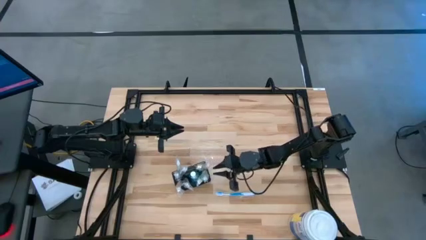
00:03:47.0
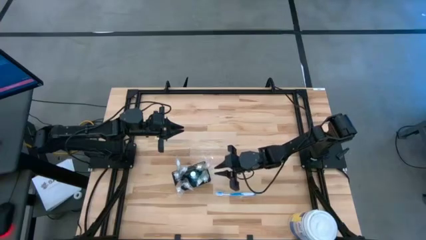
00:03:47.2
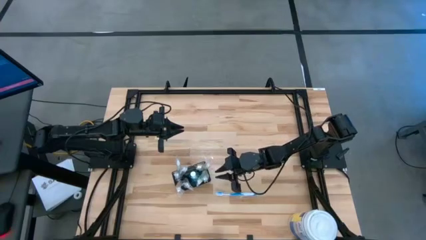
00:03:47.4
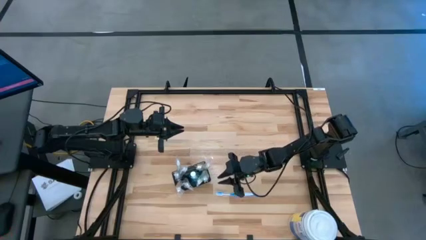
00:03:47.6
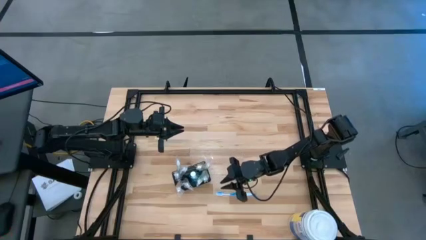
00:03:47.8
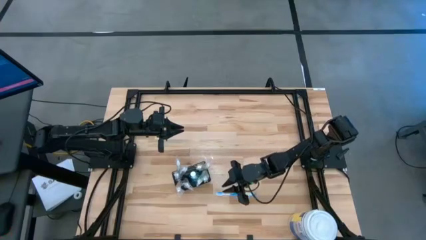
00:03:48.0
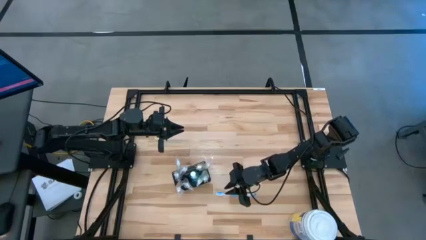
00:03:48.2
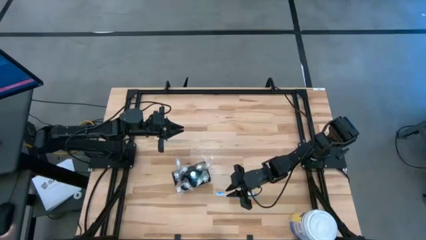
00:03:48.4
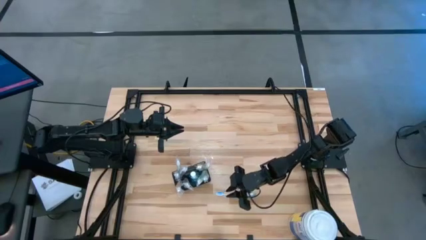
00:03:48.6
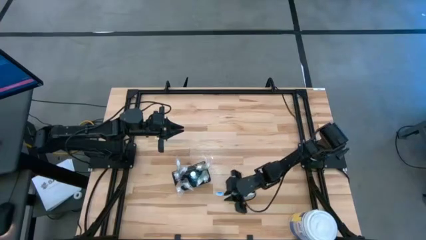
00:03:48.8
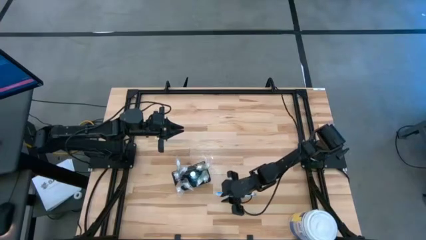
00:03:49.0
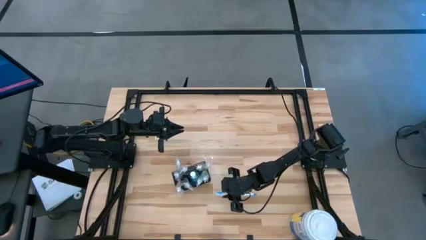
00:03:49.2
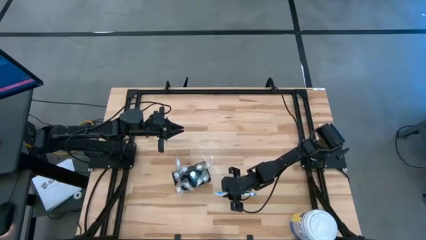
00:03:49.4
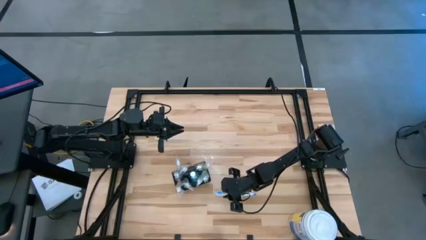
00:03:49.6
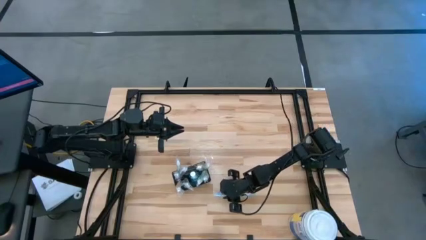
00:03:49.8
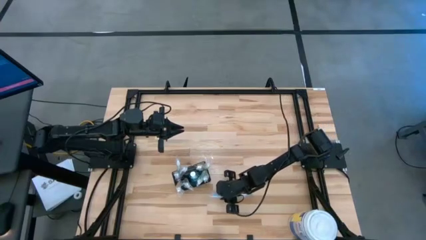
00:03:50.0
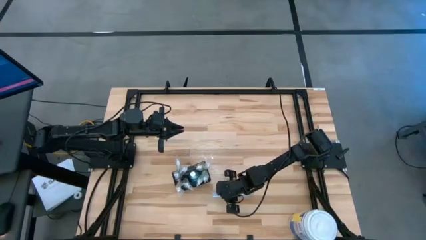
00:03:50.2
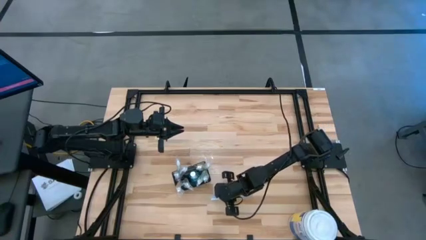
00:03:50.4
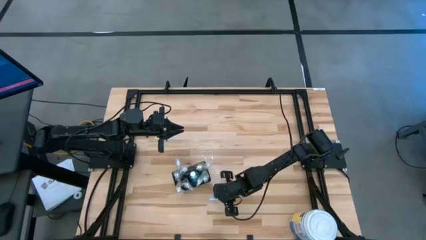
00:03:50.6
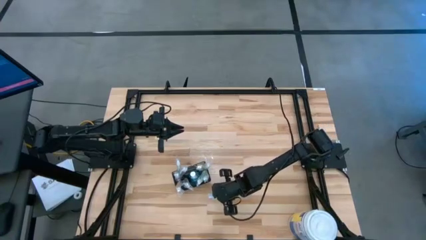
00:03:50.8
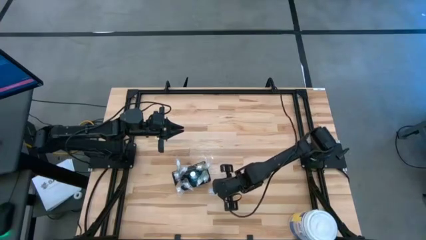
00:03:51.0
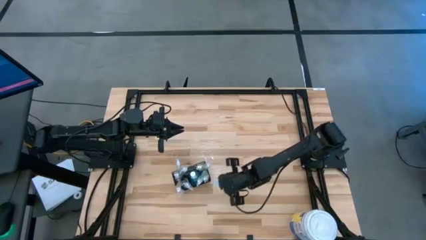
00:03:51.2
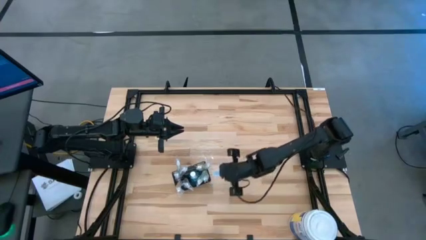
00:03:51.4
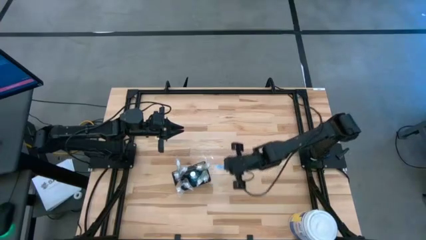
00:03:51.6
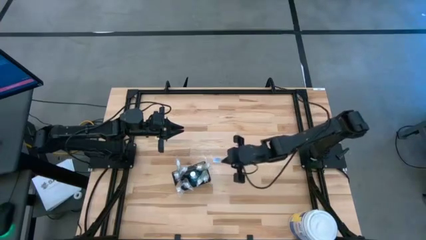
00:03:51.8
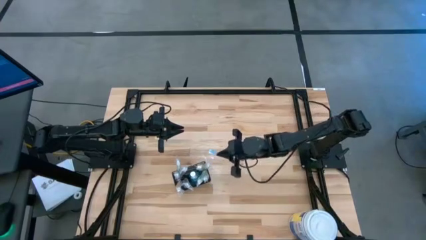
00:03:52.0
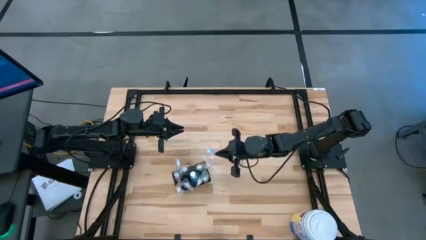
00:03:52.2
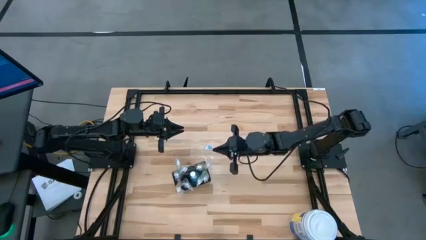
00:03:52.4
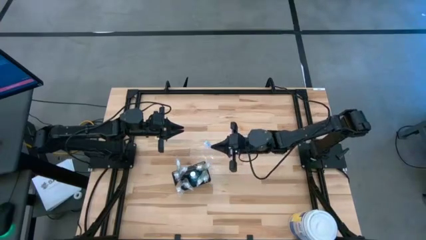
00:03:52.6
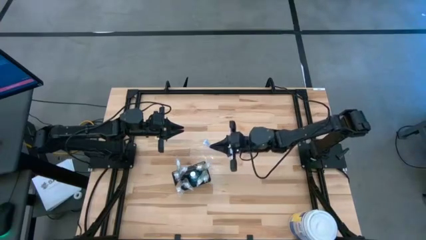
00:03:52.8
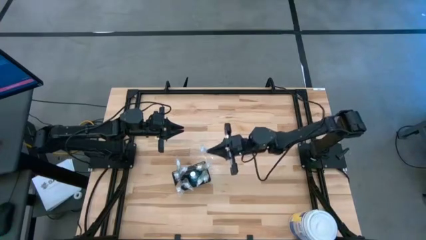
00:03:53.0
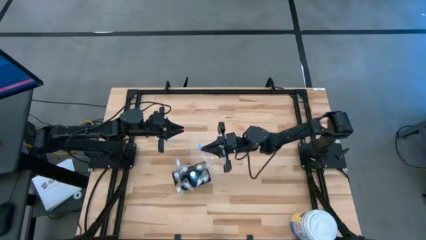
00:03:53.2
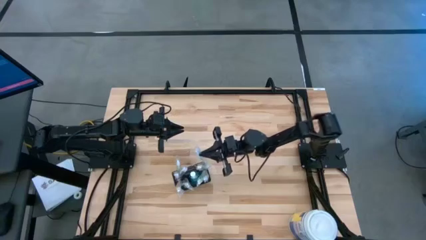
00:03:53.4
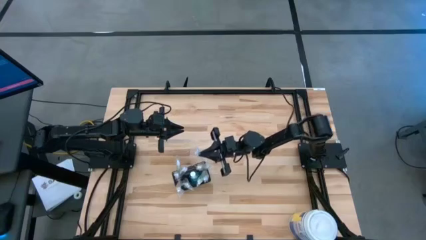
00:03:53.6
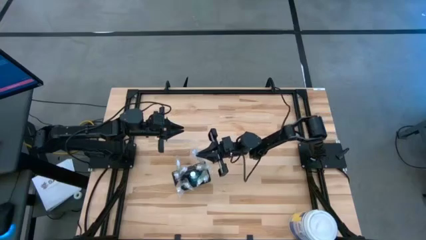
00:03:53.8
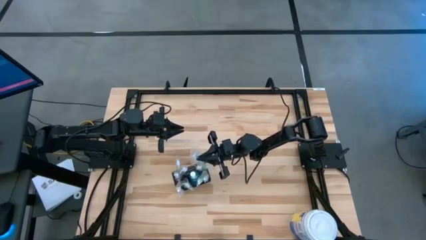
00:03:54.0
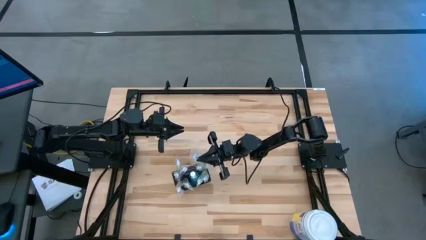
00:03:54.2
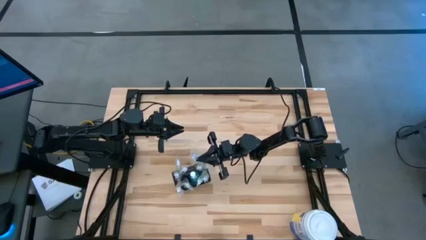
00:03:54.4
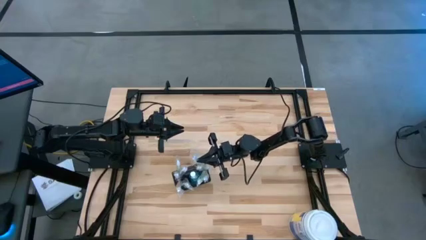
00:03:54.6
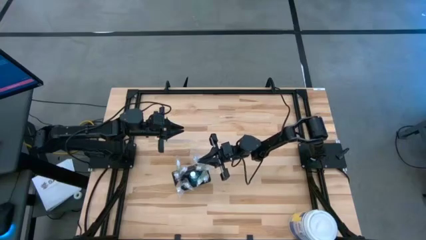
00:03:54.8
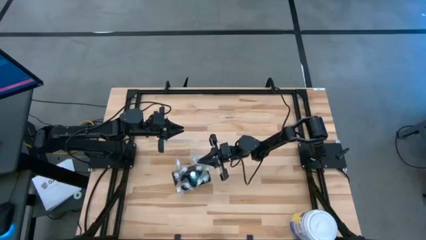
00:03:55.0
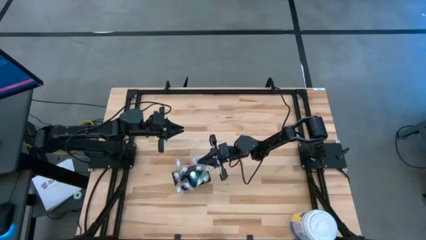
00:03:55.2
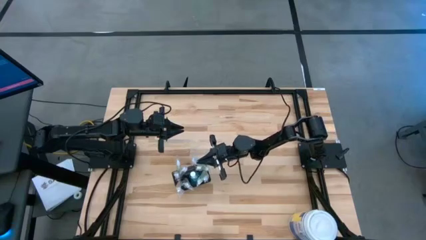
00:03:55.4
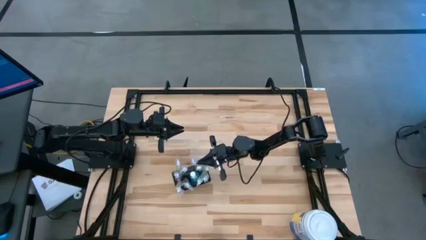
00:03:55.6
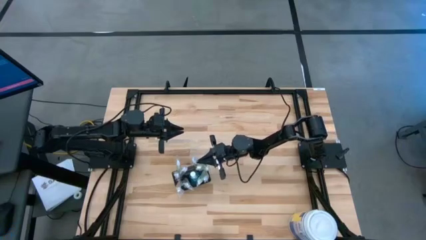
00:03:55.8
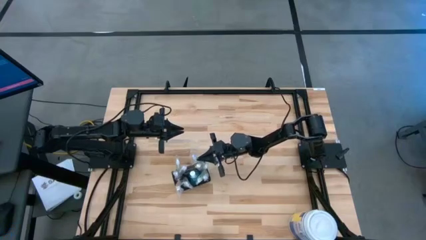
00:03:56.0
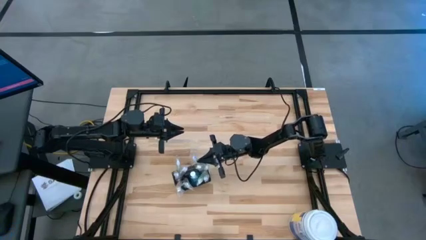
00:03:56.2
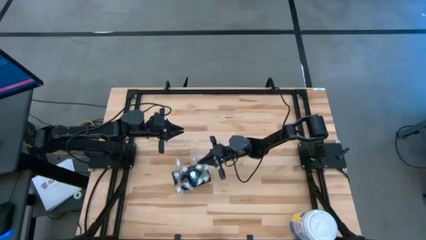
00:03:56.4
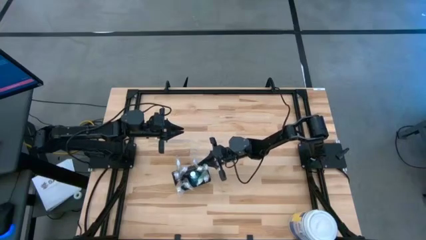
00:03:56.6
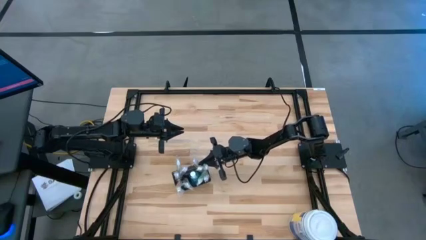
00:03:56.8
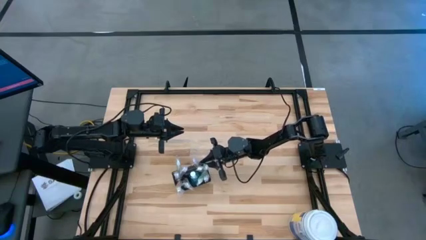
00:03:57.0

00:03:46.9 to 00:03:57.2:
Task: Pick & Place toothbrushing station
Put the white blue toothbrush into the black toothbrush rack

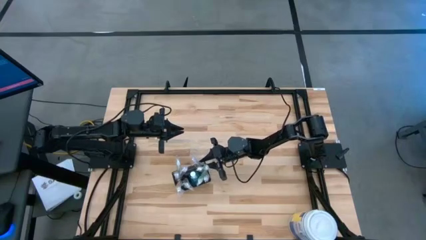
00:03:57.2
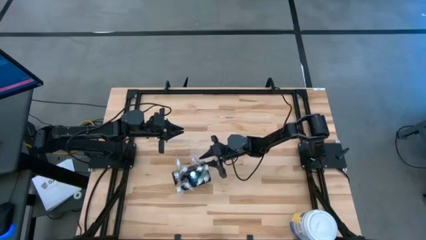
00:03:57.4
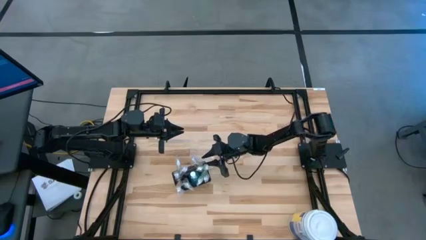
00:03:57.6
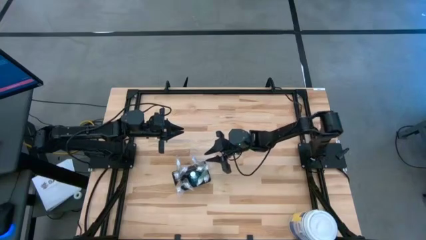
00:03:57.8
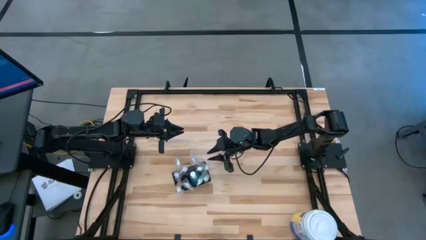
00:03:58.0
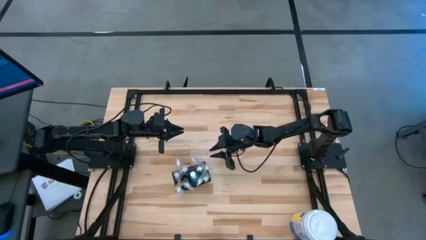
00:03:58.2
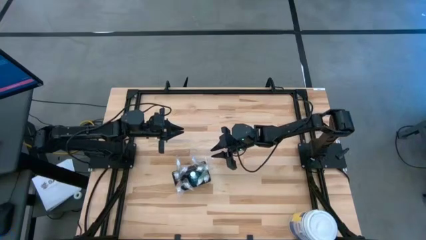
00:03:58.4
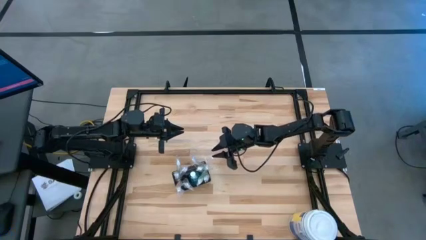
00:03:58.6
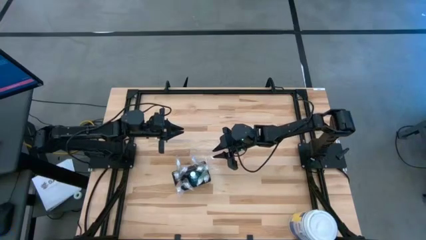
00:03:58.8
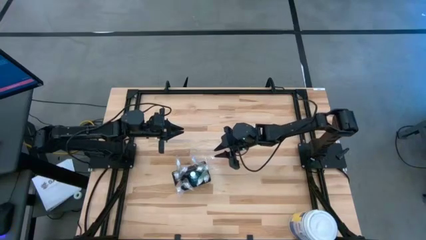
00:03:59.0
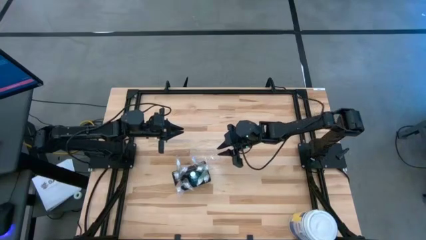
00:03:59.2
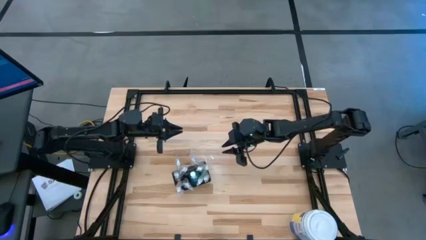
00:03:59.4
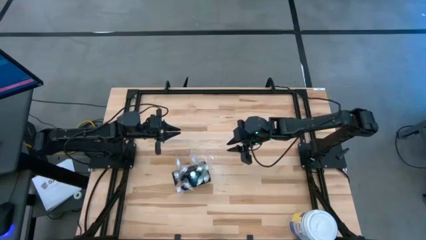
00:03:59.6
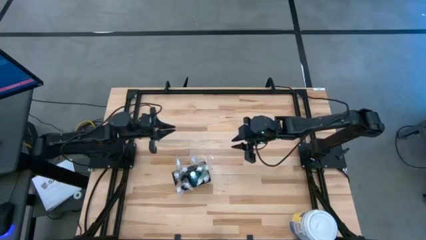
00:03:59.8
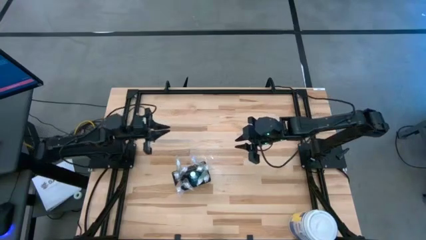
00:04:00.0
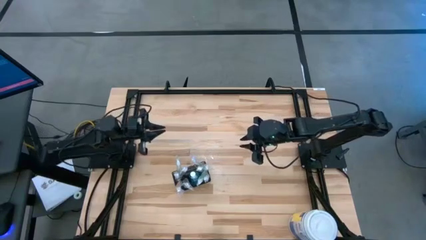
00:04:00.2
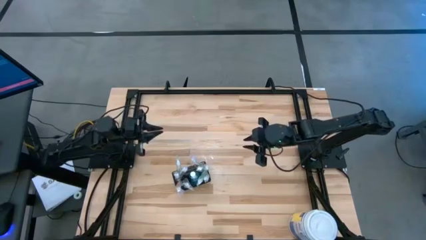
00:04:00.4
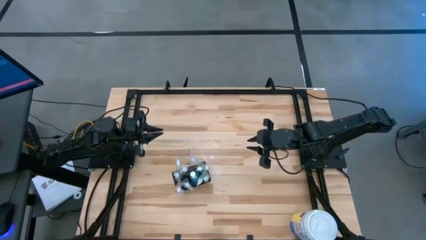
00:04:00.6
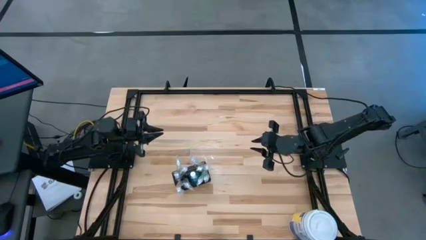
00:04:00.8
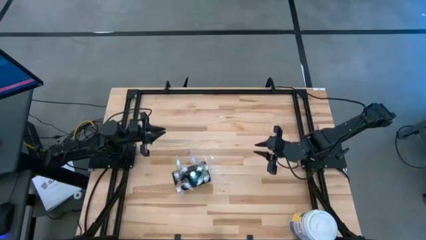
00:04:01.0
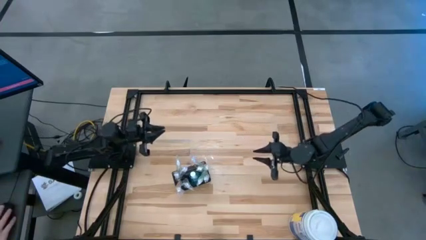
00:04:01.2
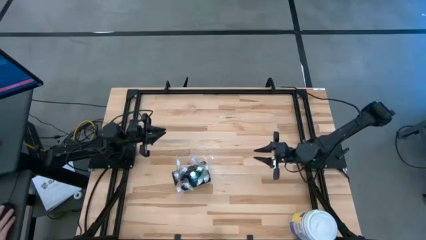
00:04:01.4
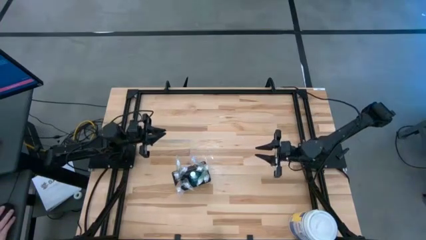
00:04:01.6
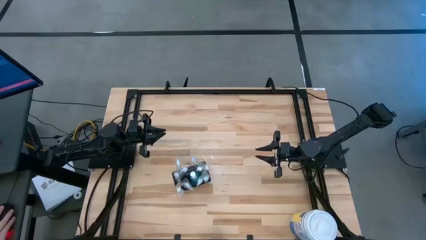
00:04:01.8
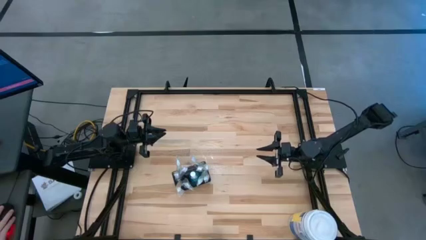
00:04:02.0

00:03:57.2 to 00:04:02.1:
Return to Home Position

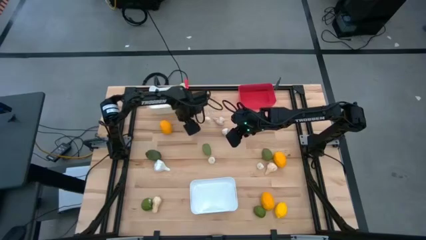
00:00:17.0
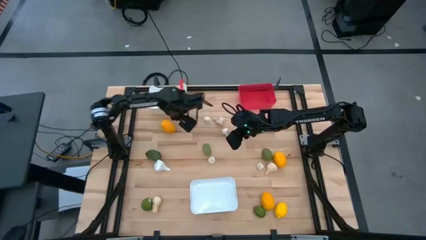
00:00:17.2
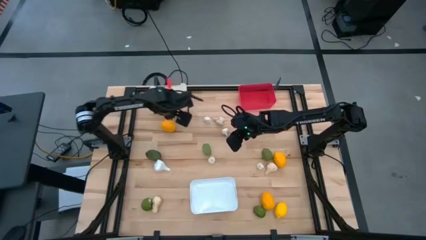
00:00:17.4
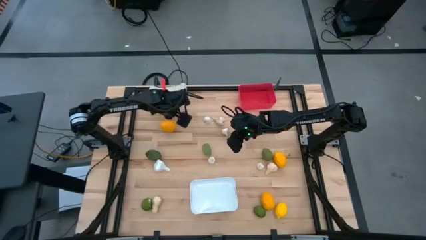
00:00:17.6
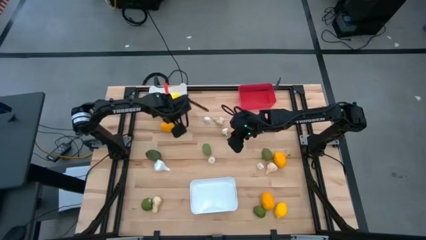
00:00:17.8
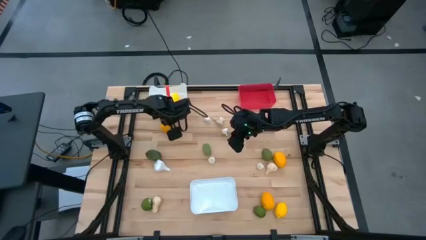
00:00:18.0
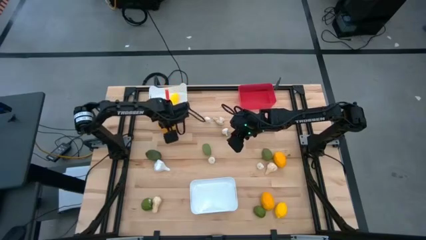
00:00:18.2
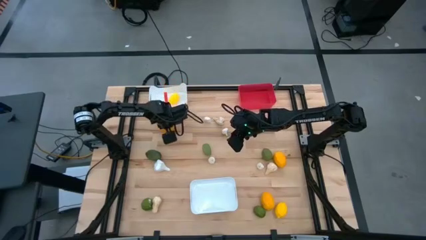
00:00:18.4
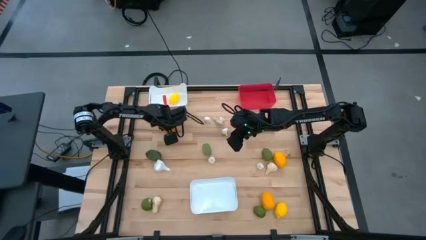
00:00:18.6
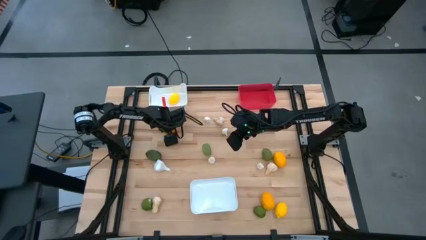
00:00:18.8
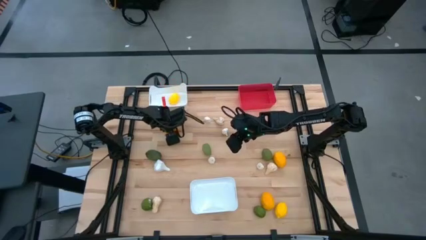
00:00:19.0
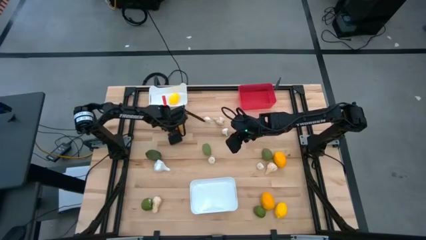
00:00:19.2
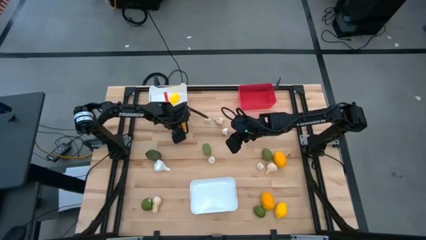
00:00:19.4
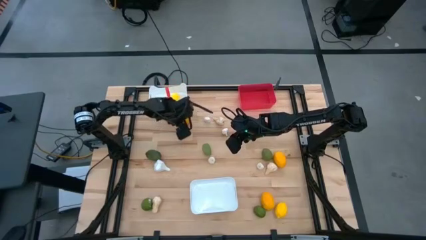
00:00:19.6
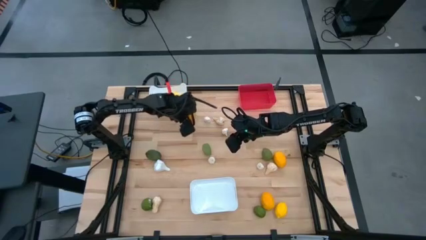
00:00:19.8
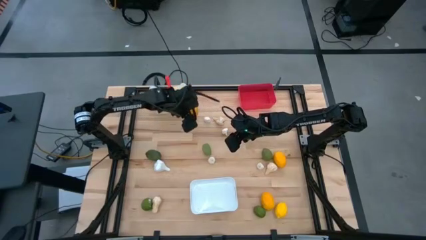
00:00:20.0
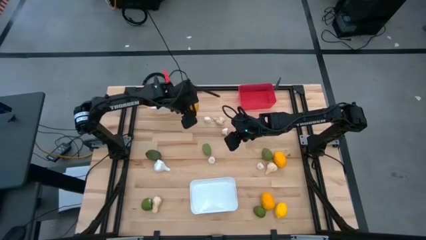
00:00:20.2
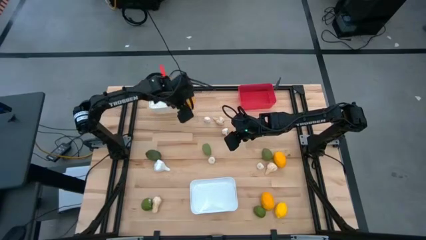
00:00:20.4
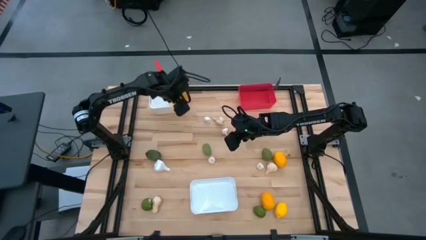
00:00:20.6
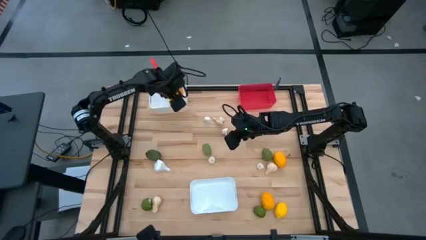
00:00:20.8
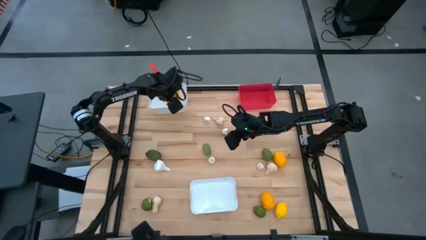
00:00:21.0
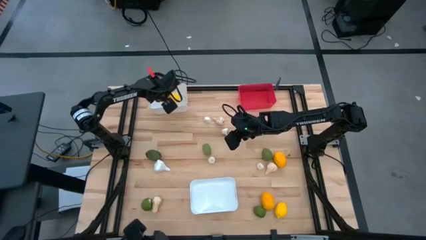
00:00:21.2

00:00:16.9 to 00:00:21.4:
Task: Sort produce into baskets
Put the yellow lemon into the top white bin
